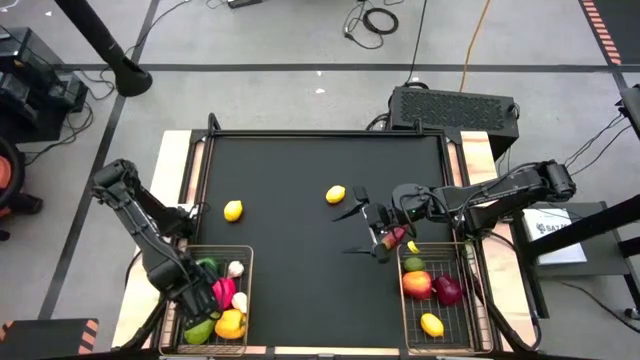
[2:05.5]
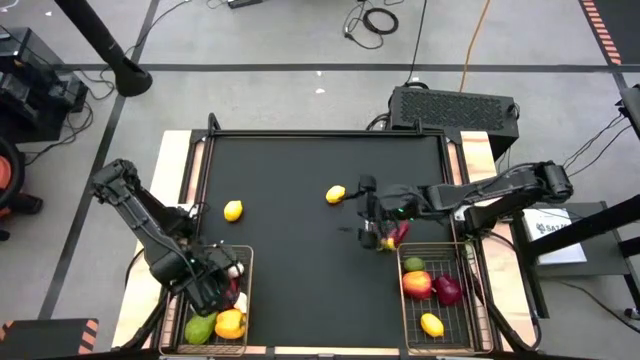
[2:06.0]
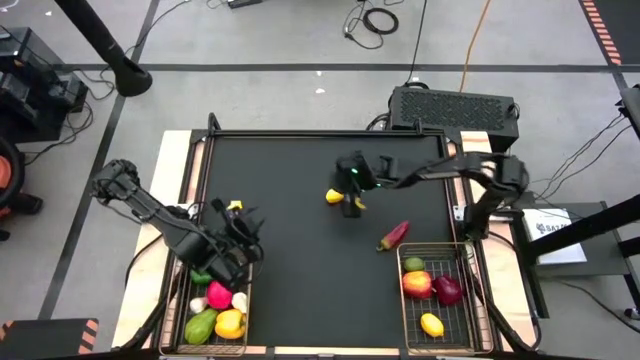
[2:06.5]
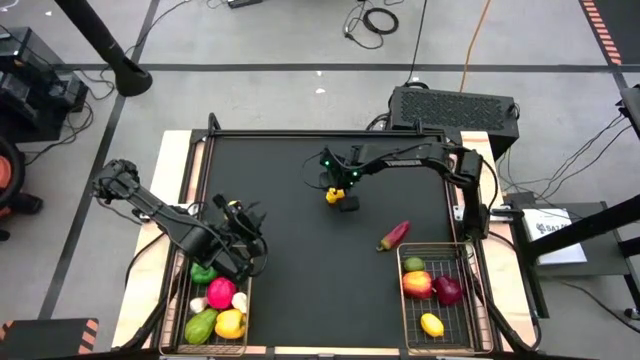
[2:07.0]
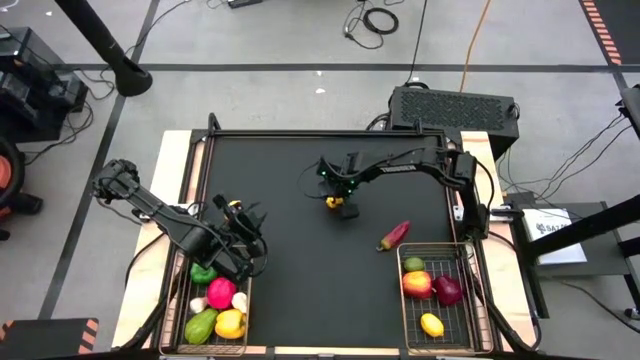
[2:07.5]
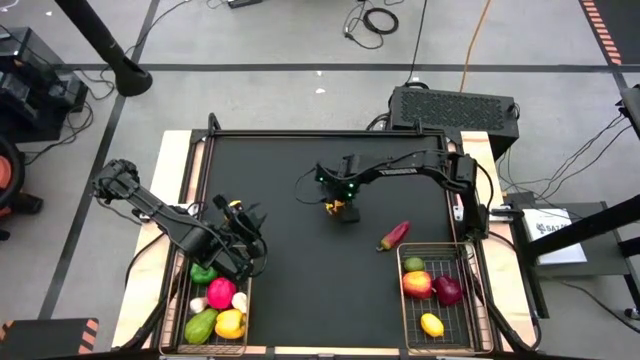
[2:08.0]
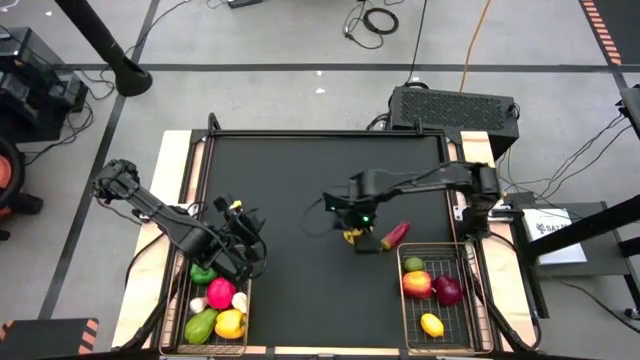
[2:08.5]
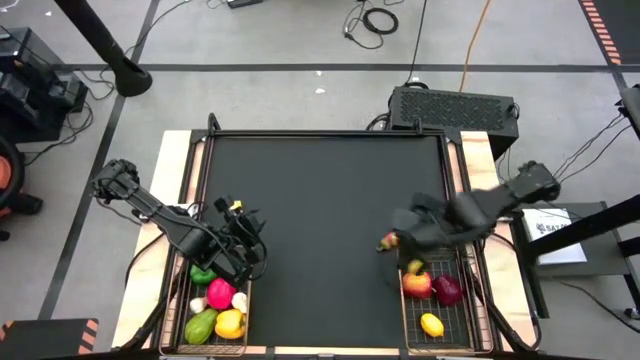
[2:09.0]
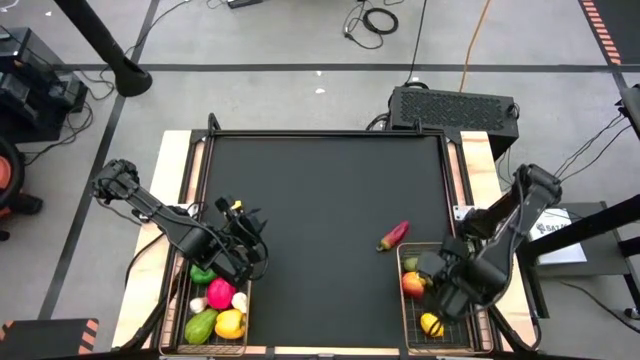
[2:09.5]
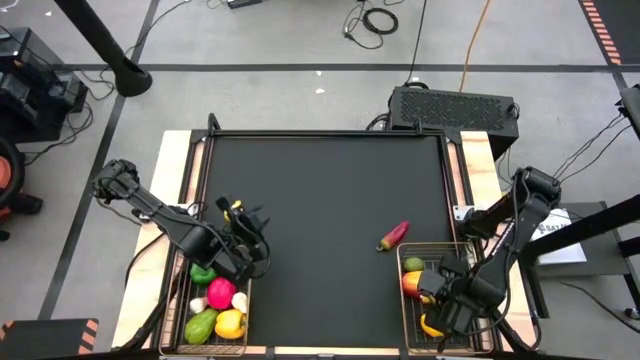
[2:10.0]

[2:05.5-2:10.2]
Task: Sort produce into baskets
Put the right yellow lemon into the right gold wire basket

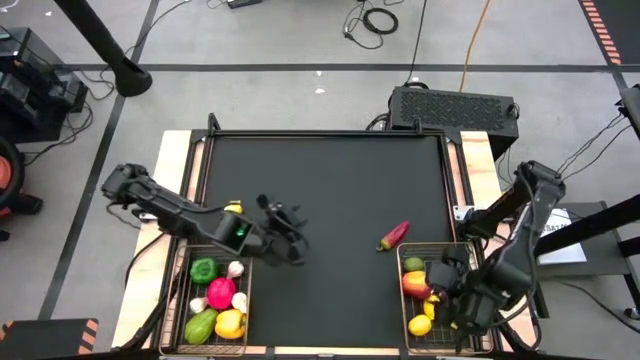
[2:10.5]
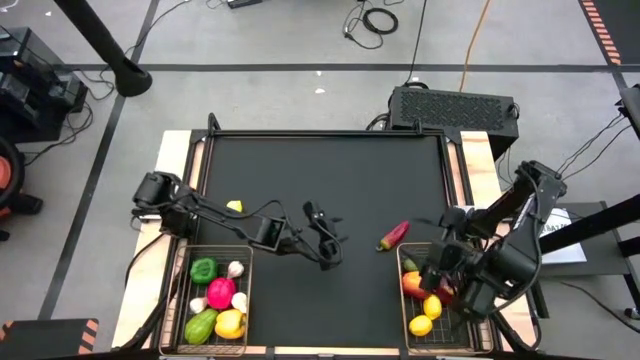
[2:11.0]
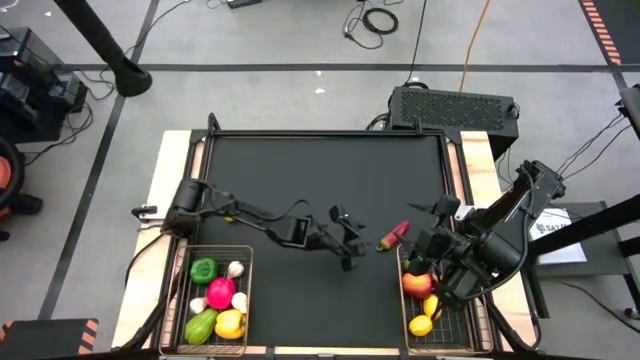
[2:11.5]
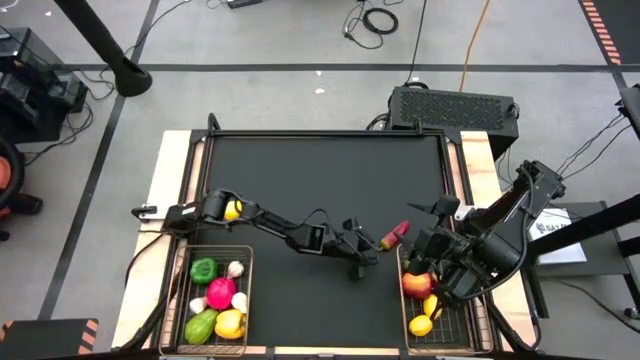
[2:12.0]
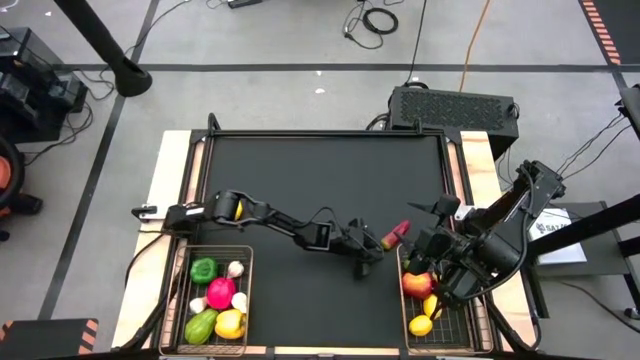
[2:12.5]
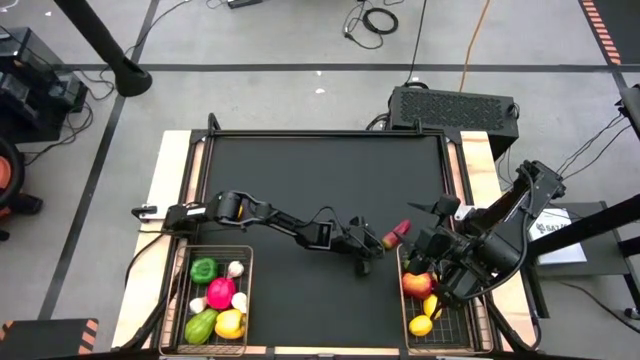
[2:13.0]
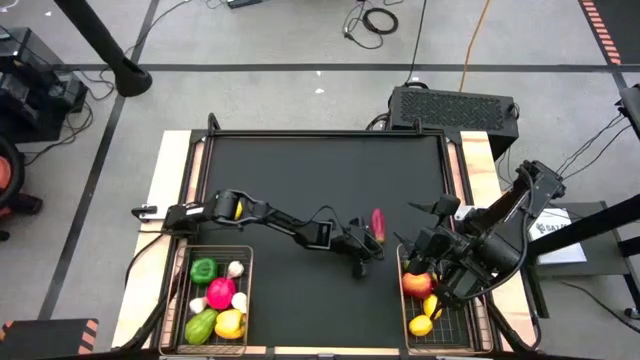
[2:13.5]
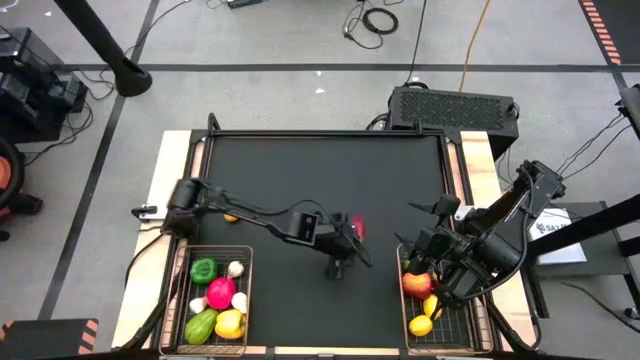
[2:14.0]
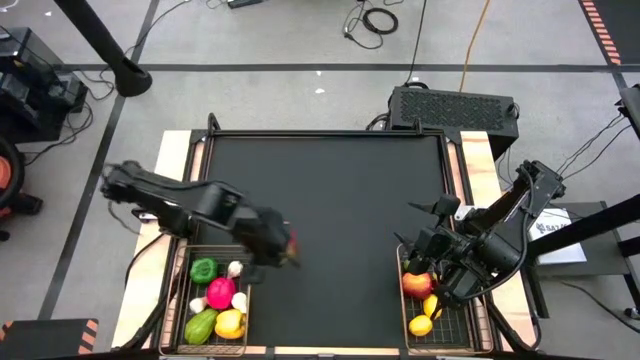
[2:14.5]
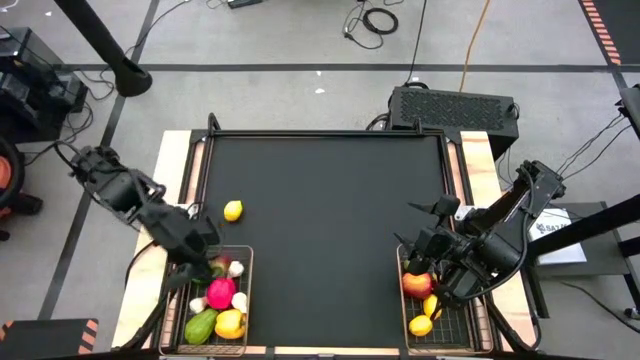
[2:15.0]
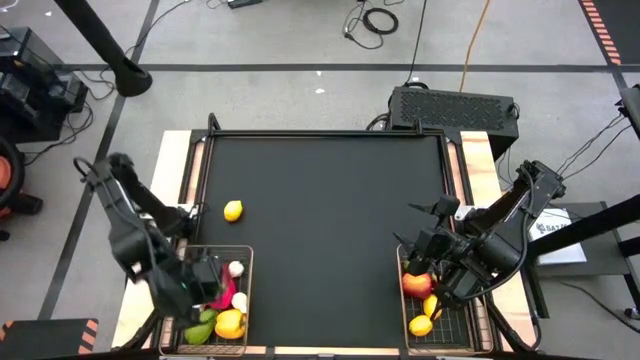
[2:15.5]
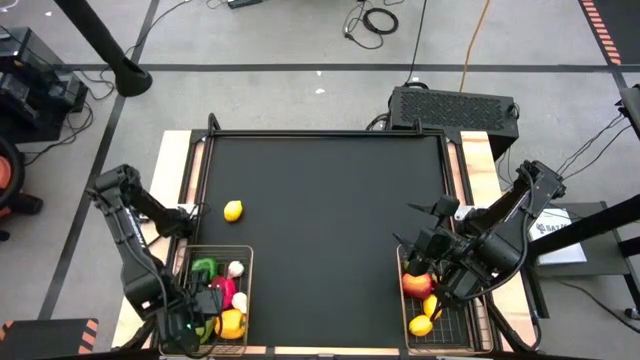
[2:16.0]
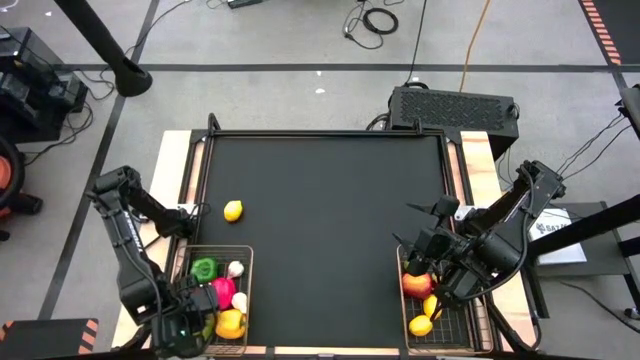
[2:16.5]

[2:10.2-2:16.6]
Put the chili pepper into the left gold wire basket

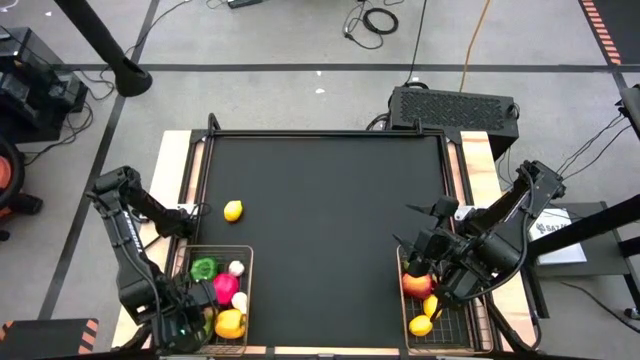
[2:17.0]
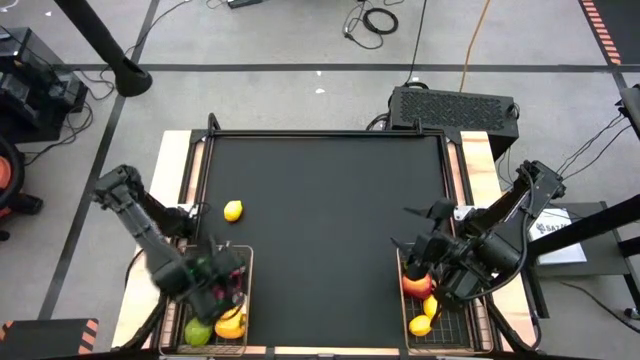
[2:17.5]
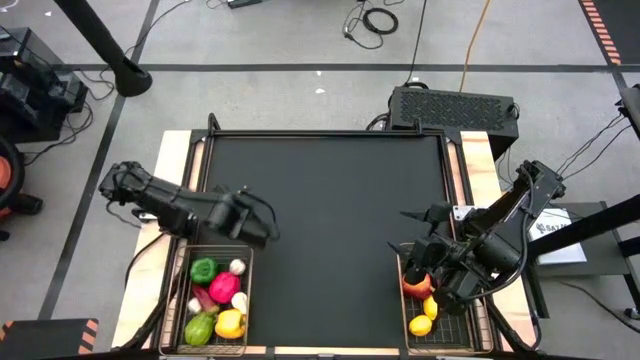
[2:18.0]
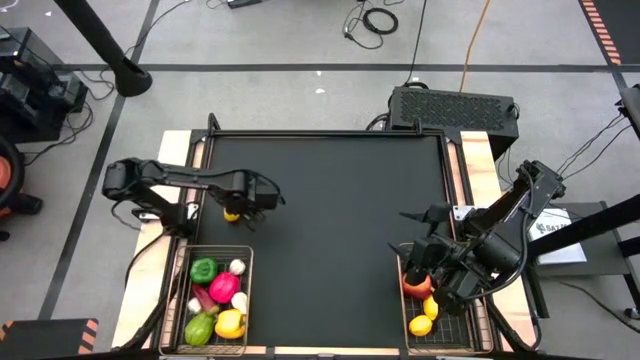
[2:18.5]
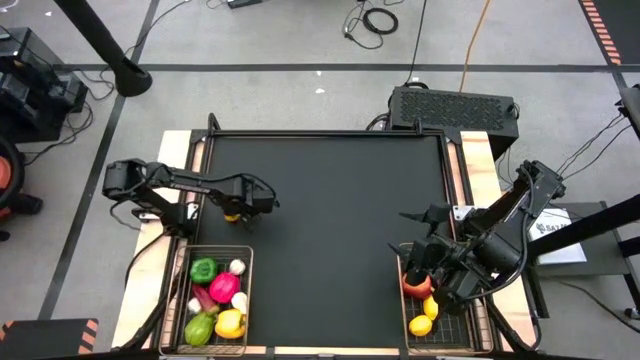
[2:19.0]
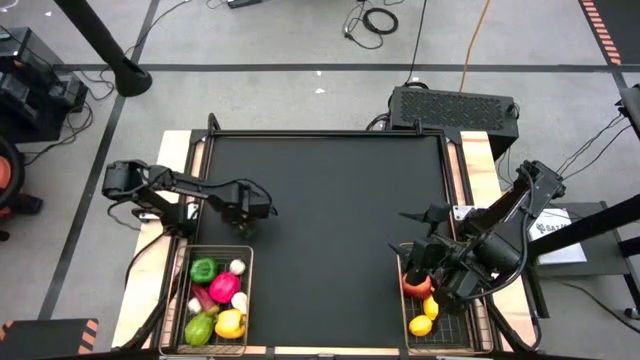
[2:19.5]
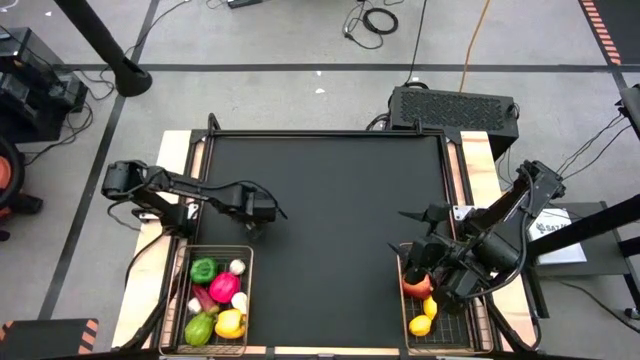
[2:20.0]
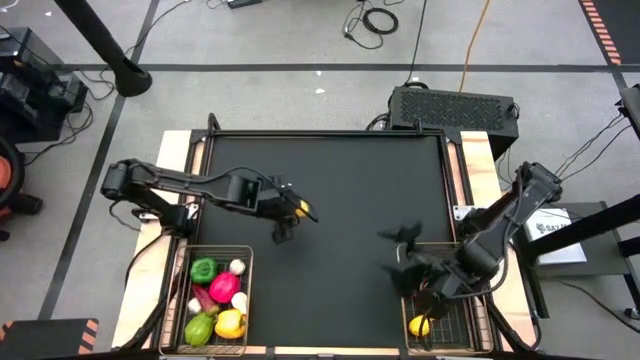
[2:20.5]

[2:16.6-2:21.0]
Put the lemon into the right gold wire basket

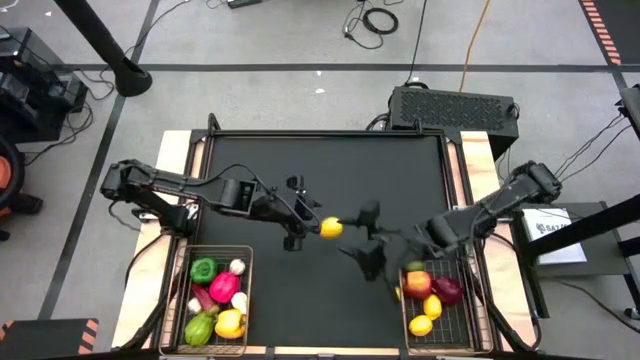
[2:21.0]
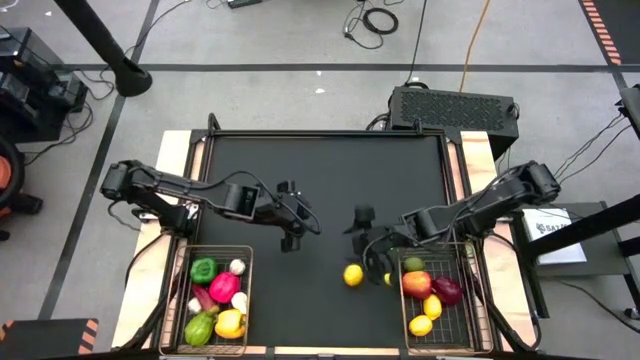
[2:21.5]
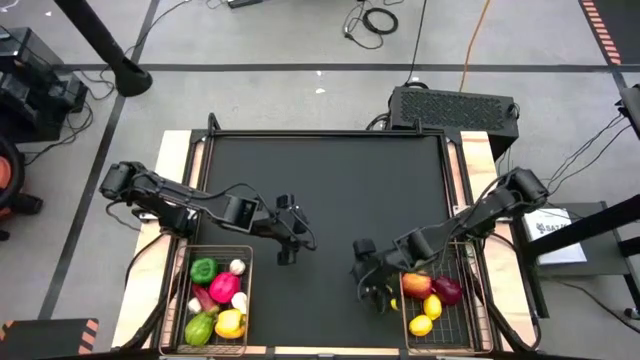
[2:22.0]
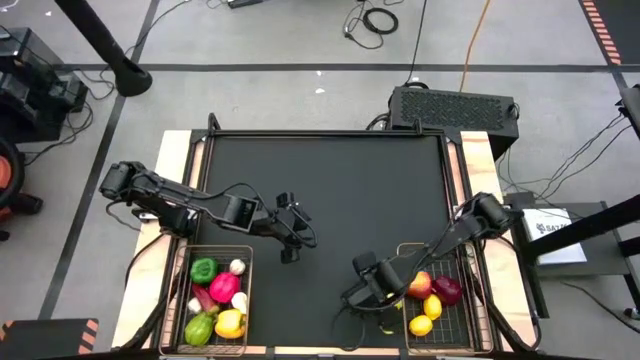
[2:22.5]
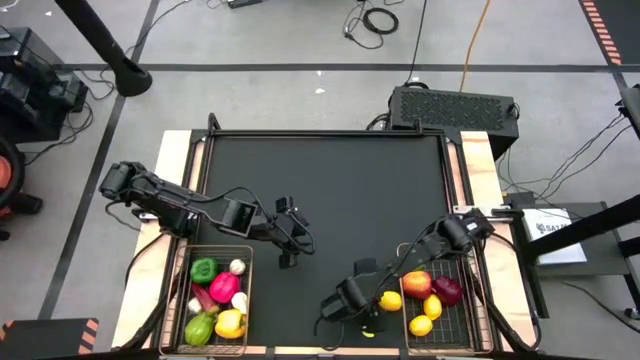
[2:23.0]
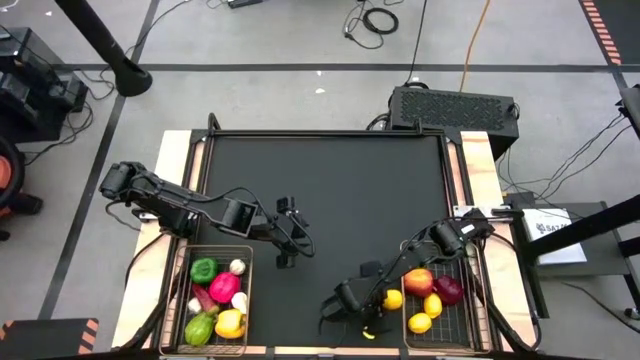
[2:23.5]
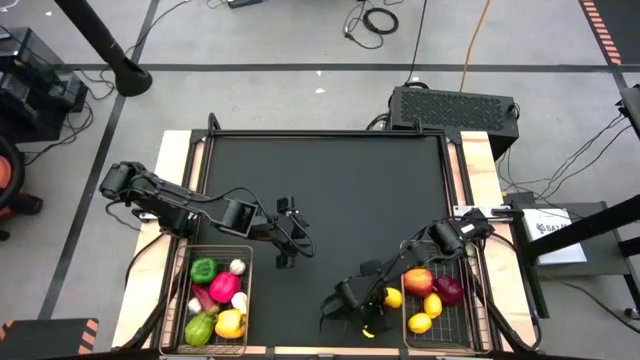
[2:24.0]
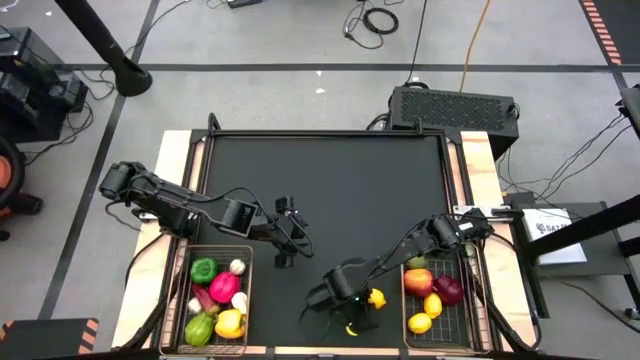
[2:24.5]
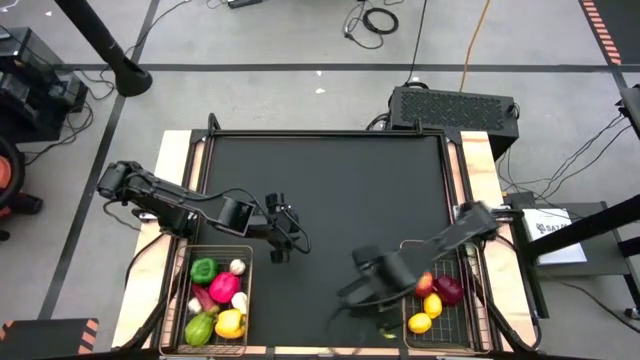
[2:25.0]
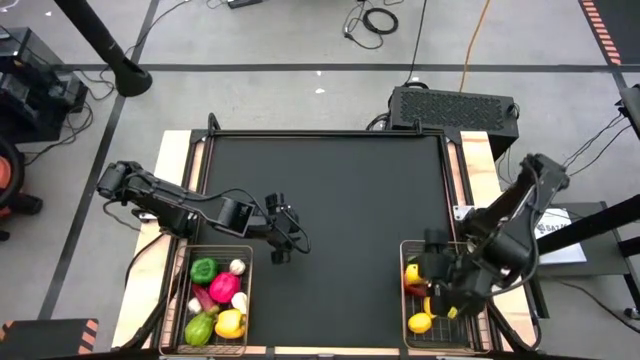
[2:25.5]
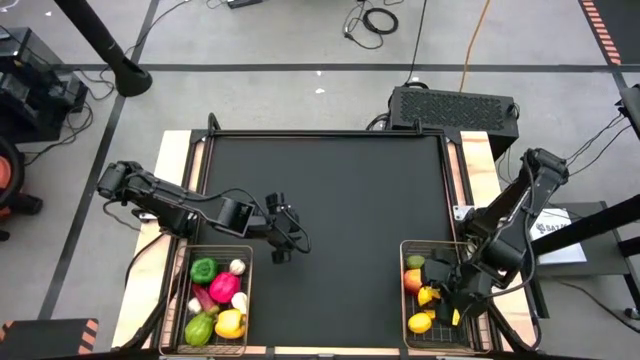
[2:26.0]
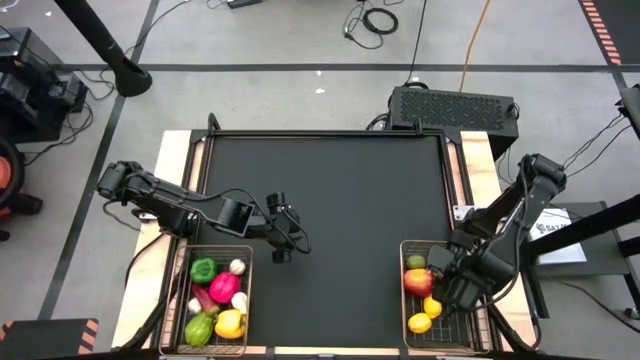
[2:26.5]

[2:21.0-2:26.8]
Put the lemon into the right gold wire basket
